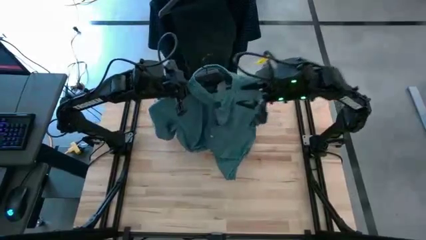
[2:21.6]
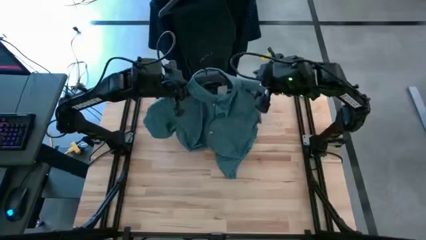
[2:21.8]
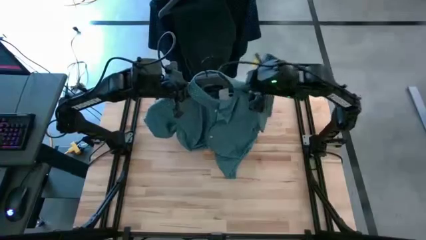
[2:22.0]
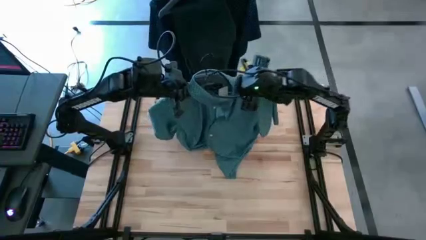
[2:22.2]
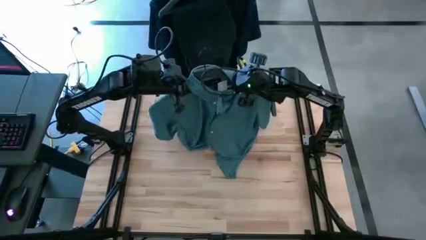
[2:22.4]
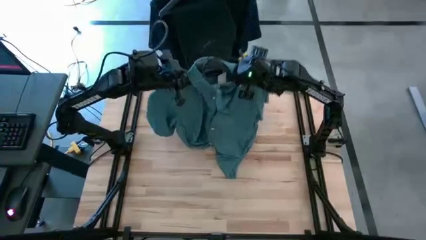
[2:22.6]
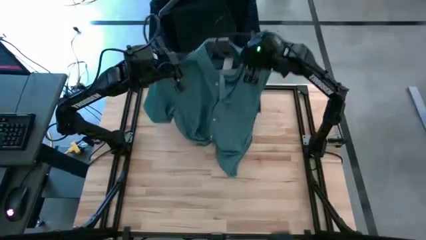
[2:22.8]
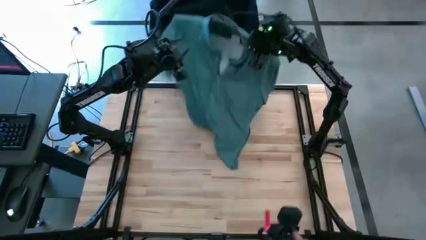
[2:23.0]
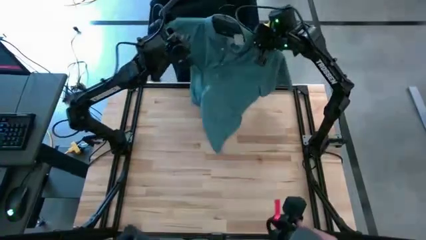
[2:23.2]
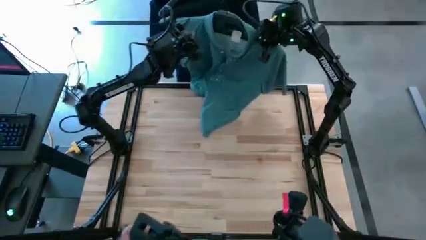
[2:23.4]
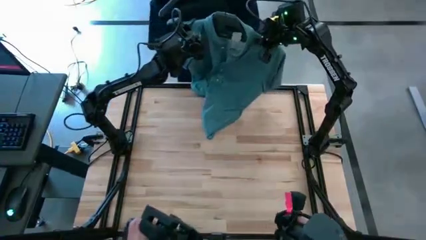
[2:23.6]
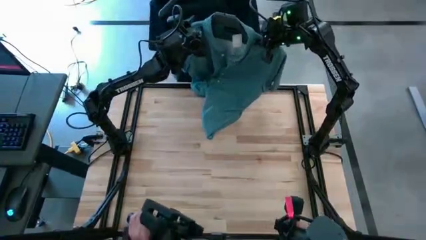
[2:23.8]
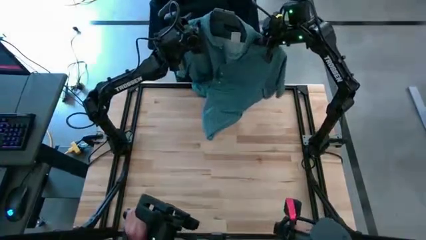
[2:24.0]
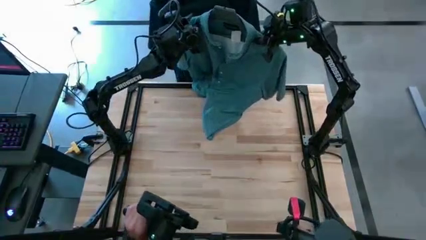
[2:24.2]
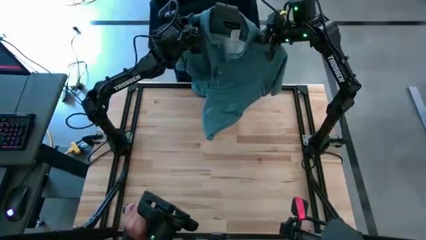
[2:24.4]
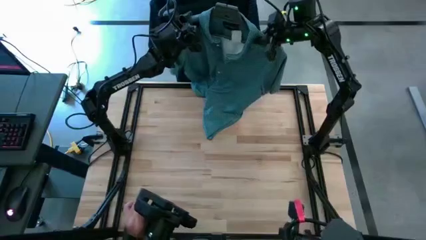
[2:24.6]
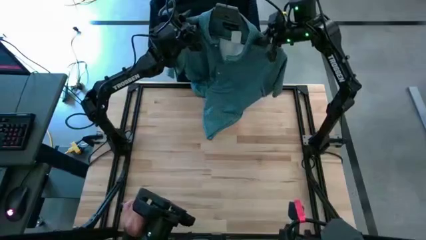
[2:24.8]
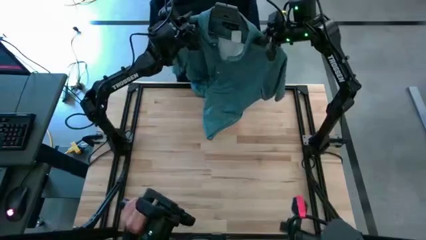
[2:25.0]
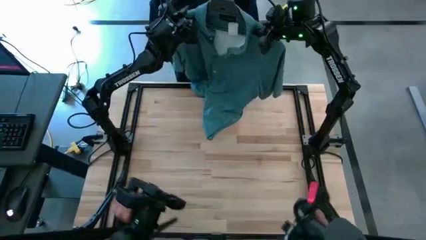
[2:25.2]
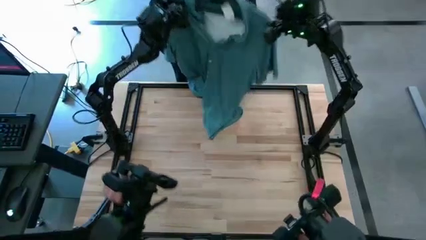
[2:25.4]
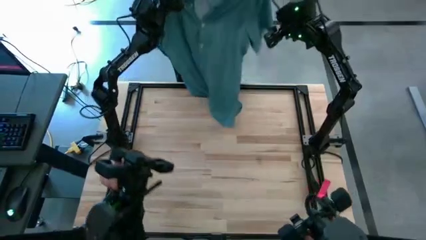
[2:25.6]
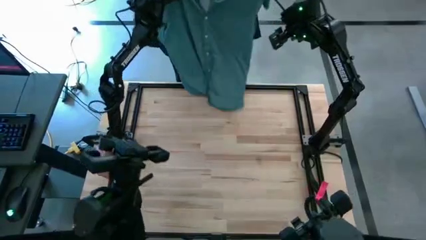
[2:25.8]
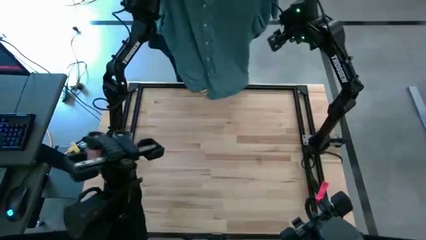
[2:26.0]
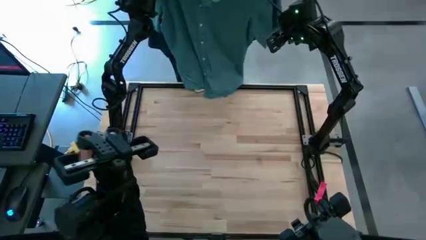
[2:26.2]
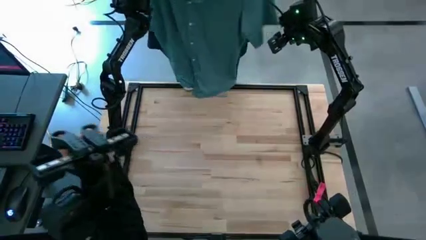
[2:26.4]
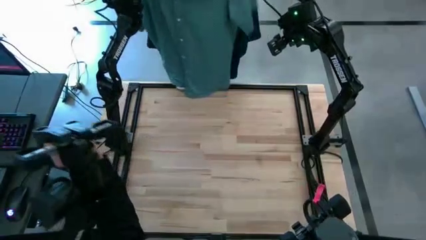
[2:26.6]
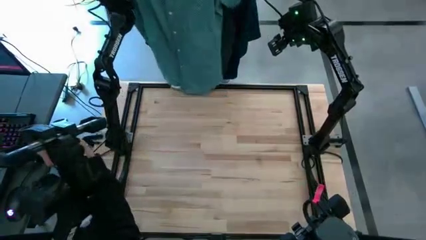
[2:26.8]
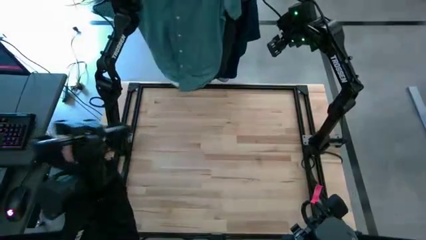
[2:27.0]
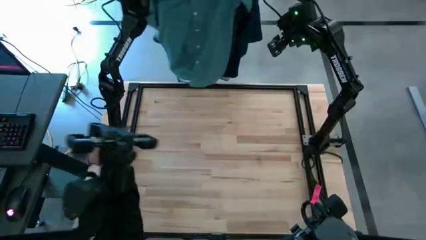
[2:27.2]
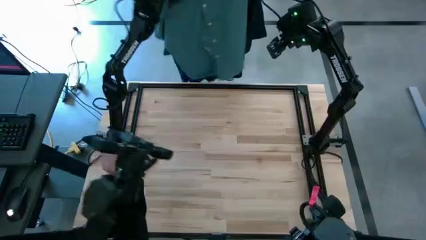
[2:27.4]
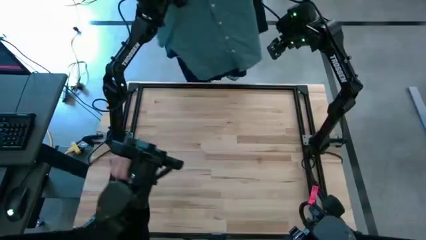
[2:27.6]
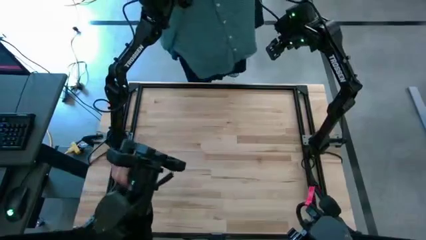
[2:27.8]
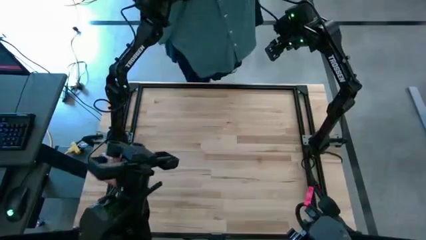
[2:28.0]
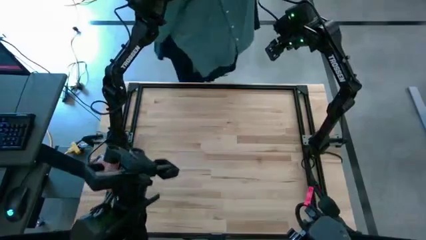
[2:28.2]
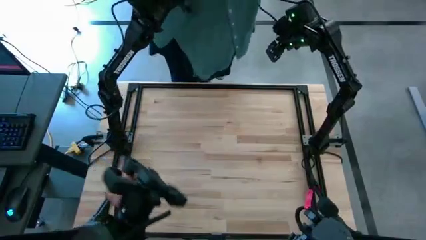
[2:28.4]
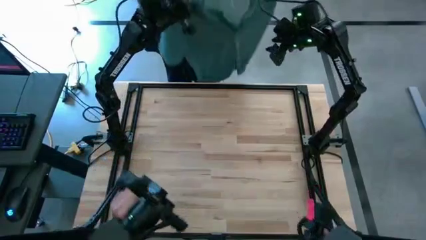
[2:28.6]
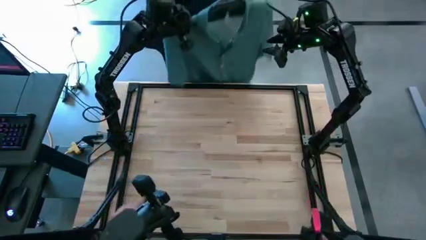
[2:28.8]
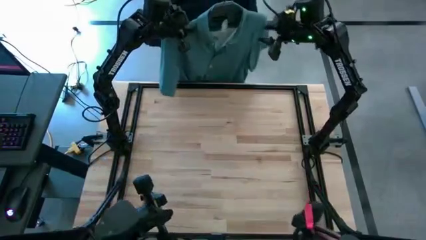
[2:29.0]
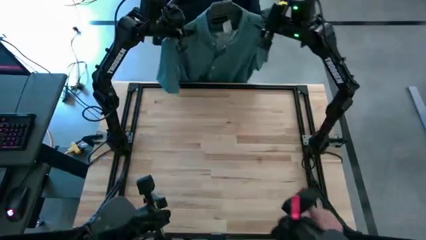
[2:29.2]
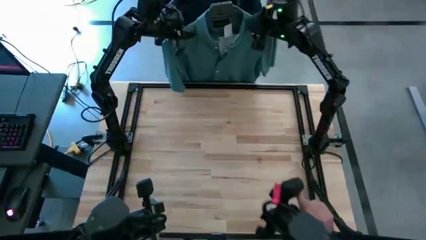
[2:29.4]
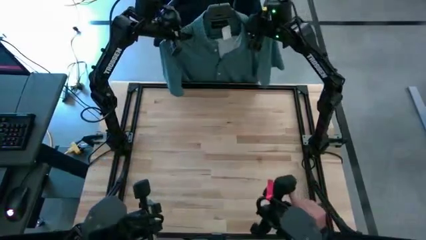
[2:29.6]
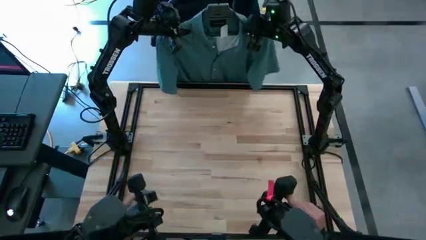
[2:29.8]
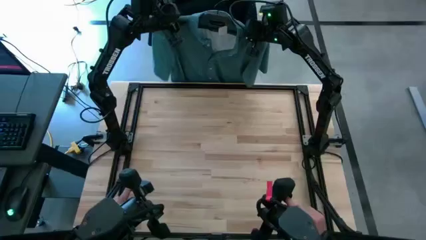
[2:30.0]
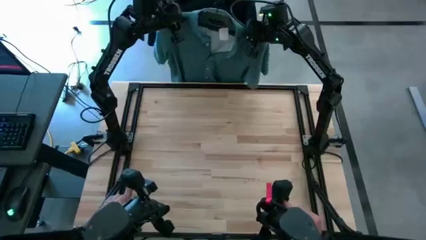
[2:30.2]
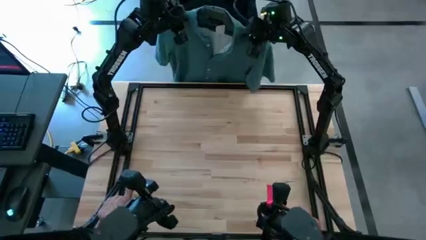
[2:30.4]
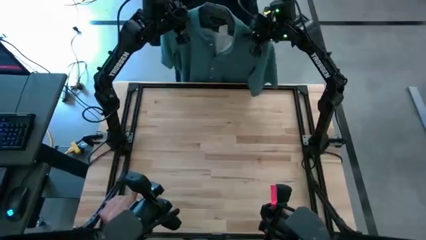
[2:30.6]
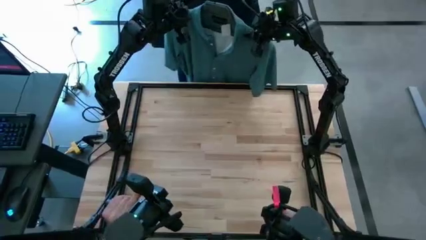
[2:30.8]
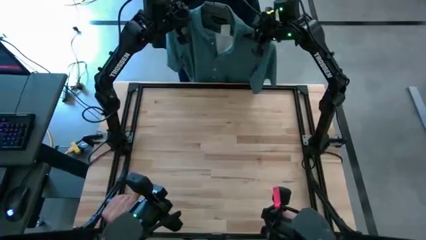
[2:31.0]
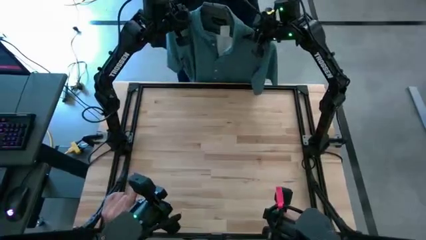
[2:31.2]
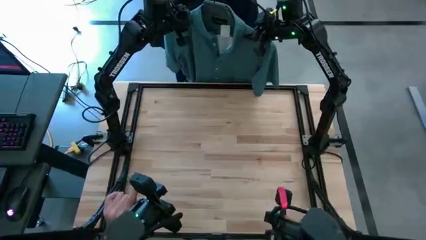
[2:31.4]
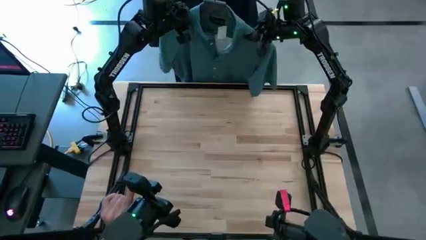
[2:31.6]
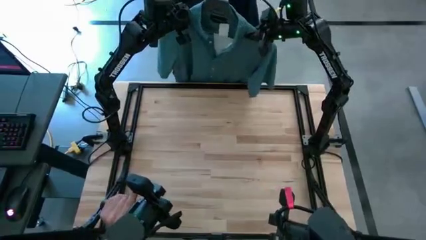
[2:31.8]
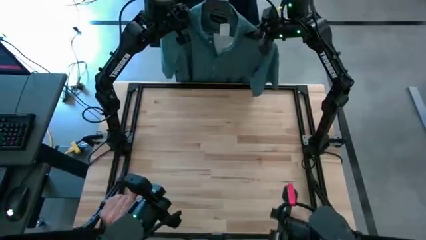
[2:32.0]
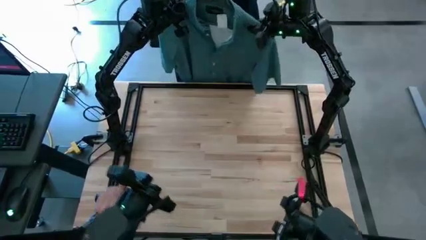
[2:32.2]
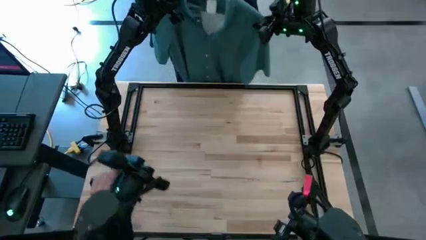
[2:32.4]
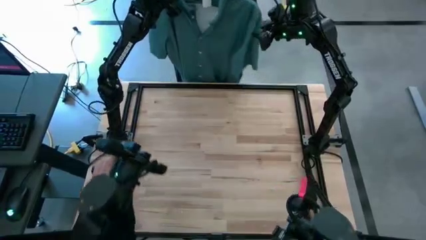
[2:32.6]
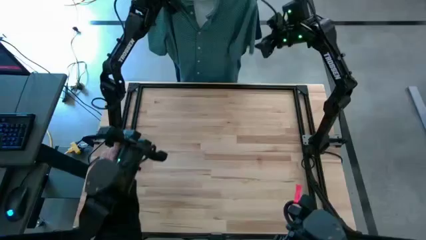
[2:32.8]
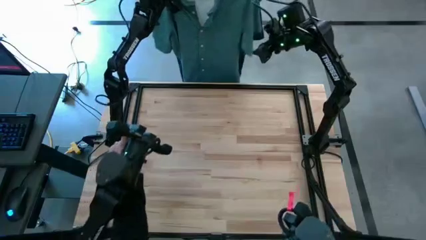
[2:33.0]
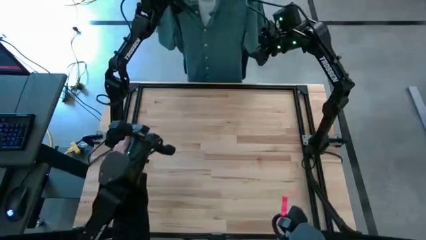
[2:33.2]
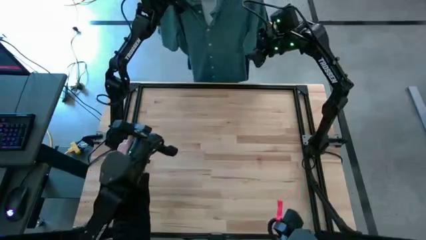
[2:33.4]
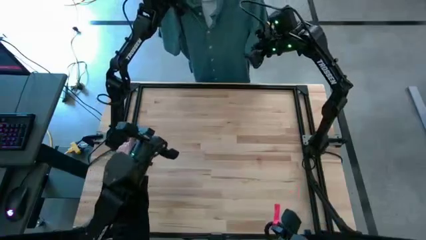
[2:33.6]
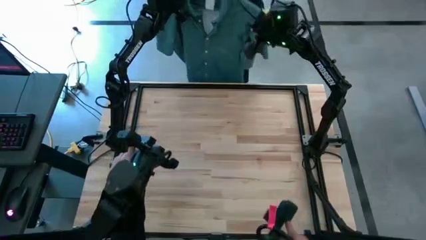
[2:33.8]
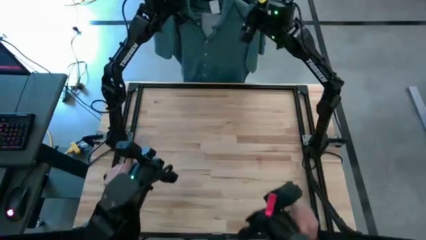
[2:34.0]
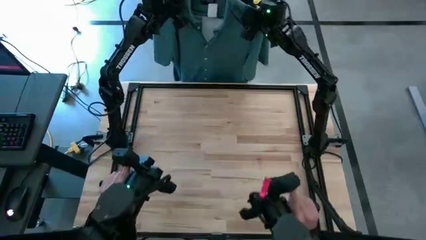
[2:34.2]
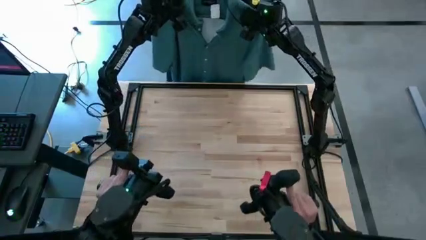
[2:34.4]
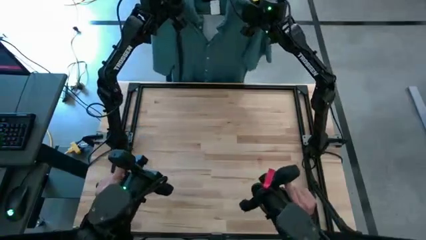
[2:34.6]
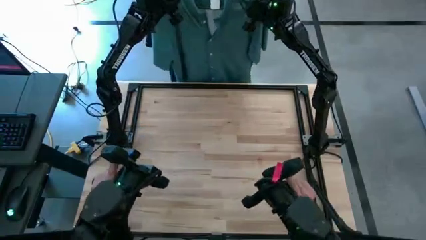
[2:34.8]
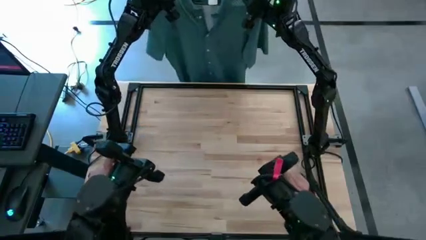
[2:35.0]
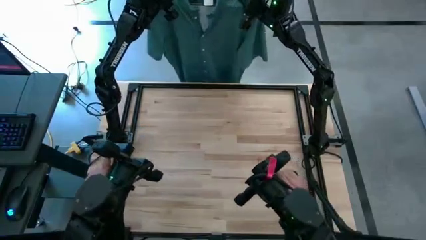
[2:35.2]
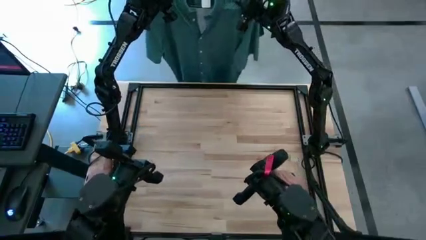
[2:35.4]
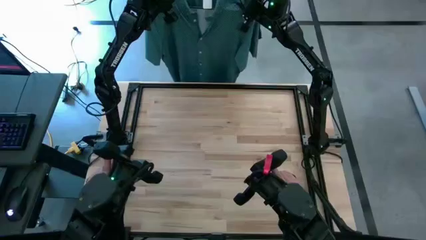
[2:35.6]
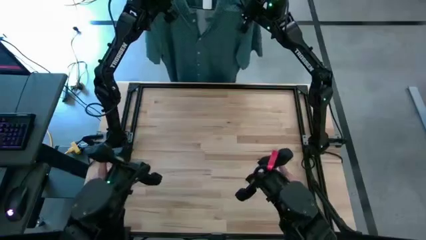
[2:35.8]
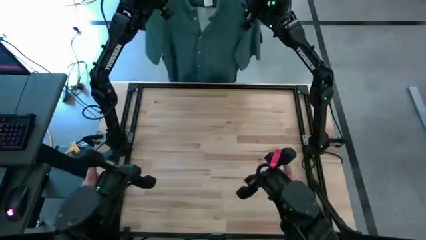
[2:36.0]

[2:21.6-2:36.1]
Task: Hang clothes
Hang the hangered light blue polo shirt on the hanger rack
